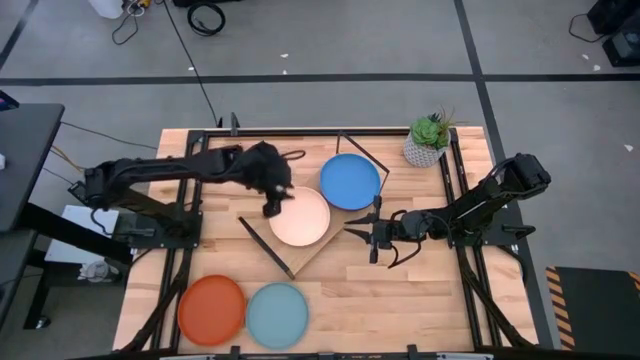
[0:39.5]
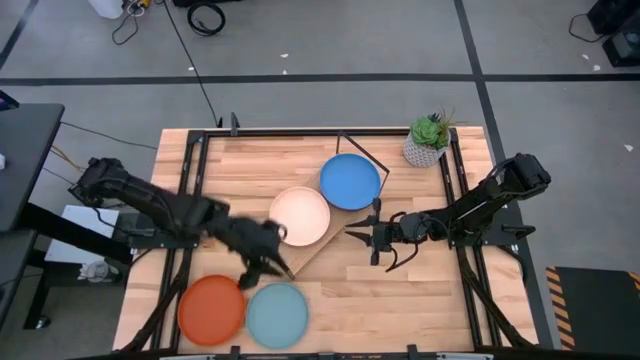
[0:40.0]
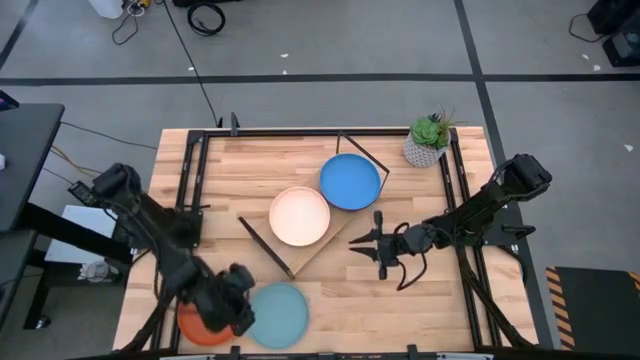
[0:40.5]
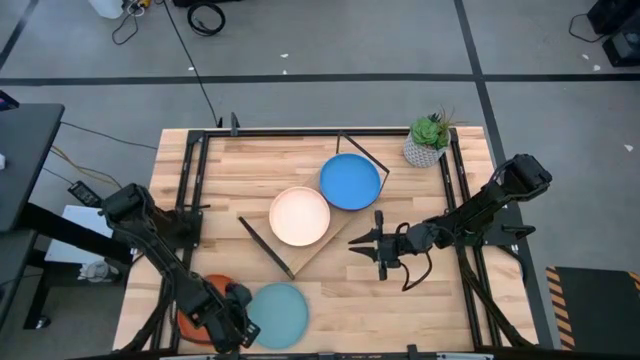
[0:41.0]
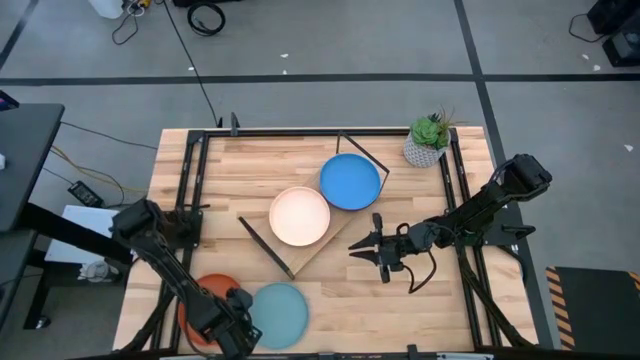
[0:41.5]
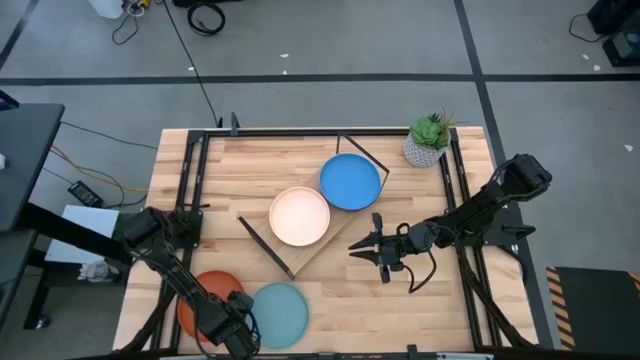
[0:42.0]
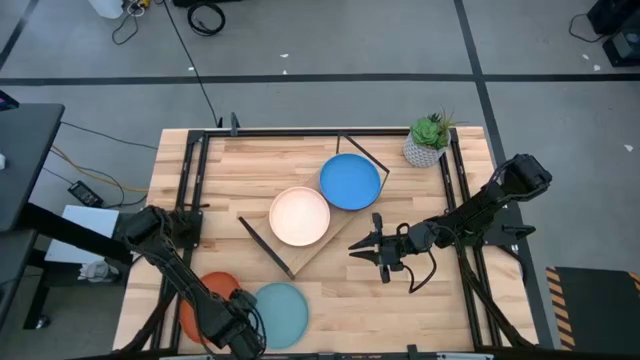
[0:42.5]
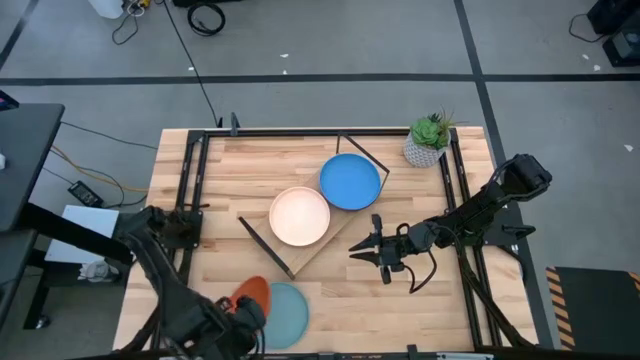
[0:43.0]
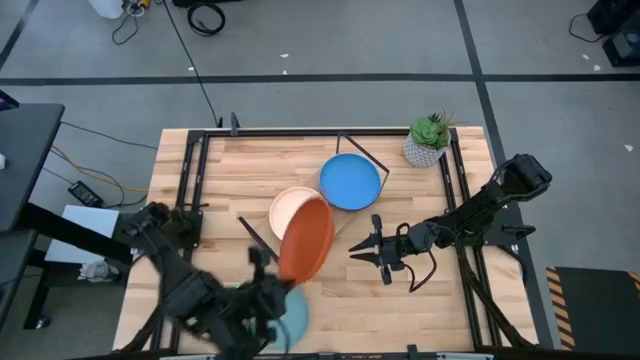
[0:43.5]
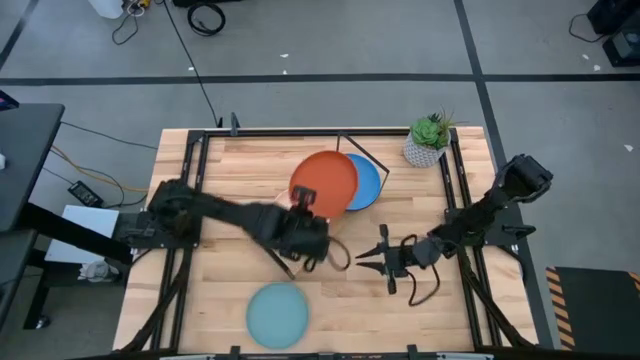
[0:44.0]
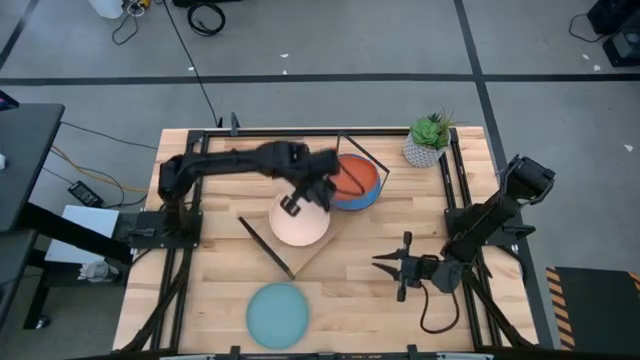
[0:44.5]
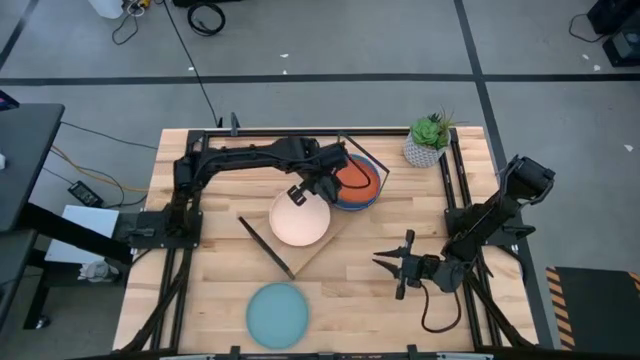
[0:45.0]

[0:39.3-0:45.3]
Task: Place and stack plates onto a shelf
Stack the orange plate on top of the blue plate

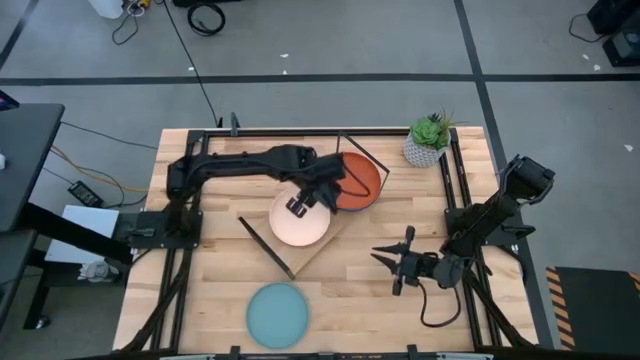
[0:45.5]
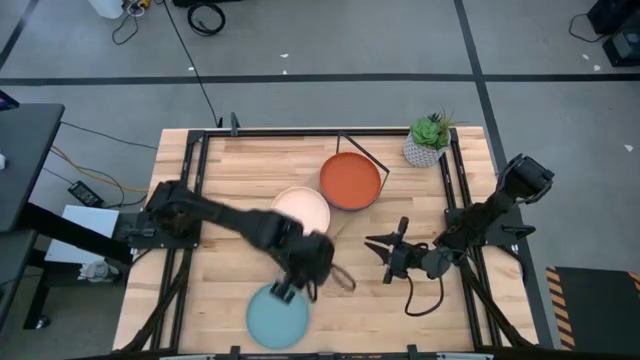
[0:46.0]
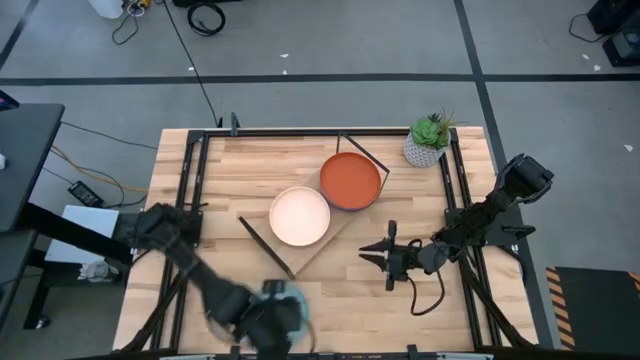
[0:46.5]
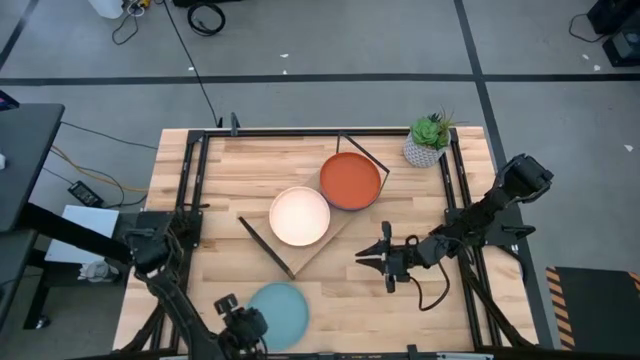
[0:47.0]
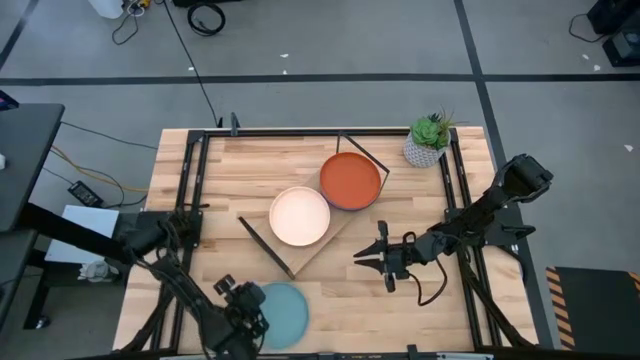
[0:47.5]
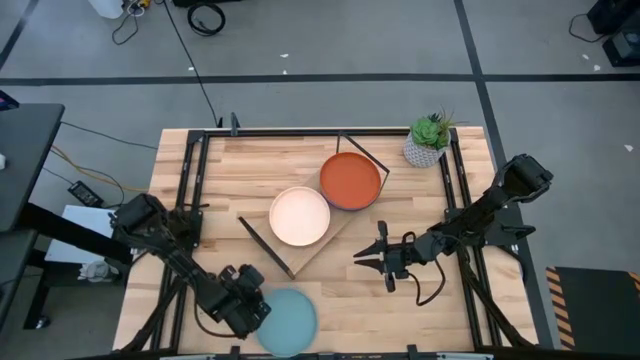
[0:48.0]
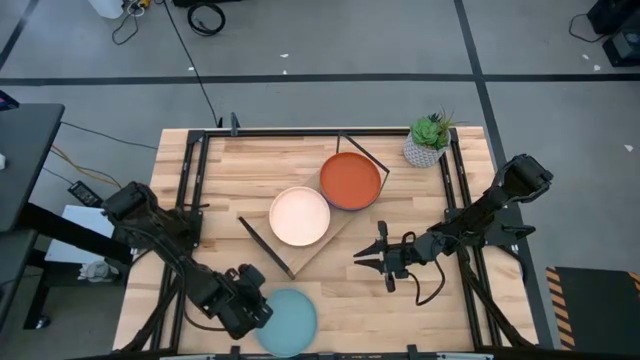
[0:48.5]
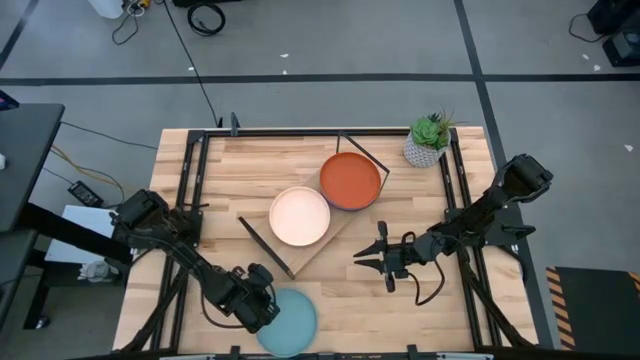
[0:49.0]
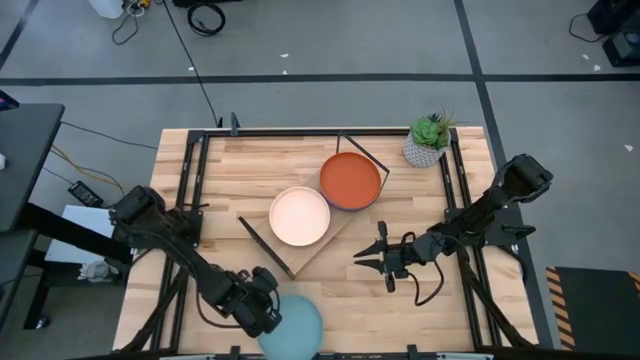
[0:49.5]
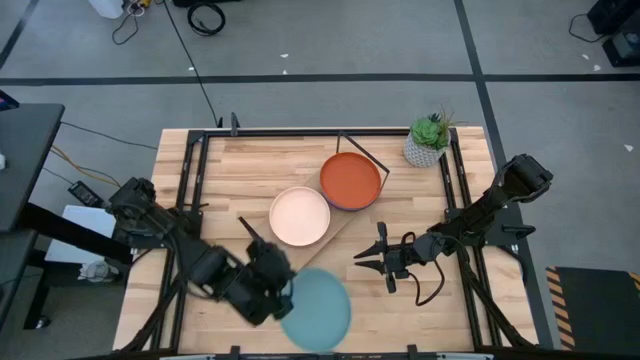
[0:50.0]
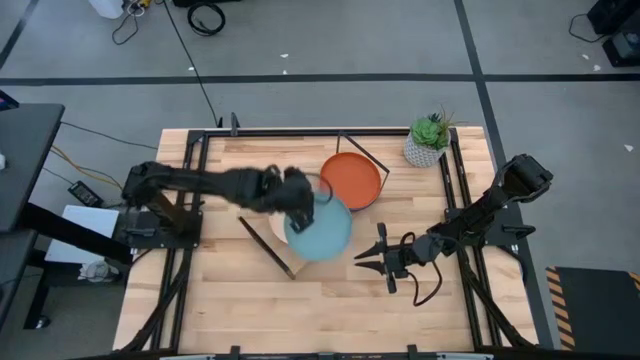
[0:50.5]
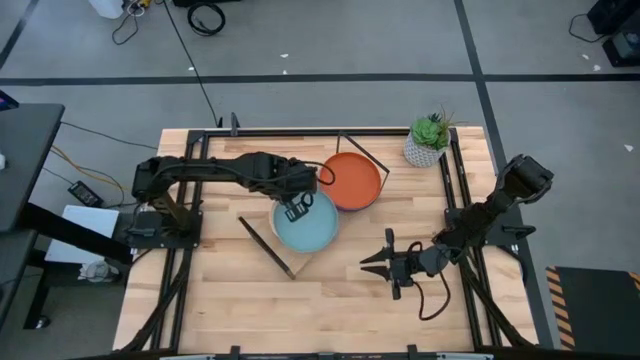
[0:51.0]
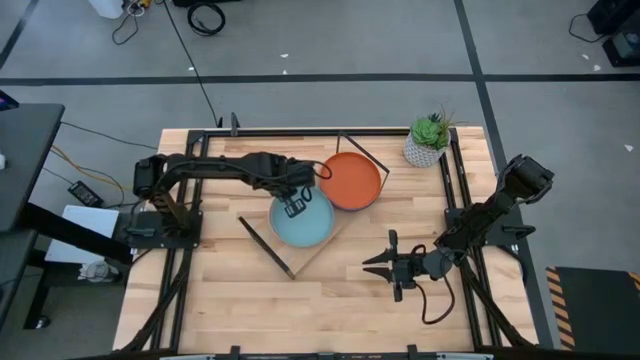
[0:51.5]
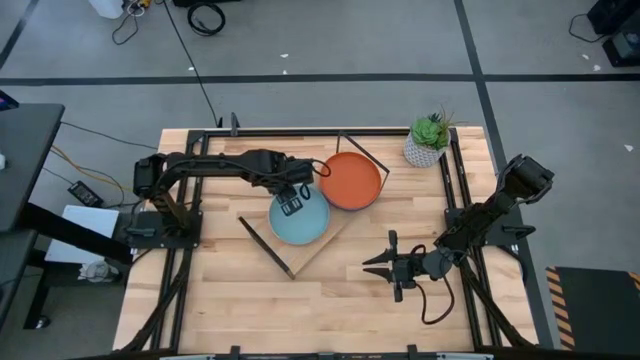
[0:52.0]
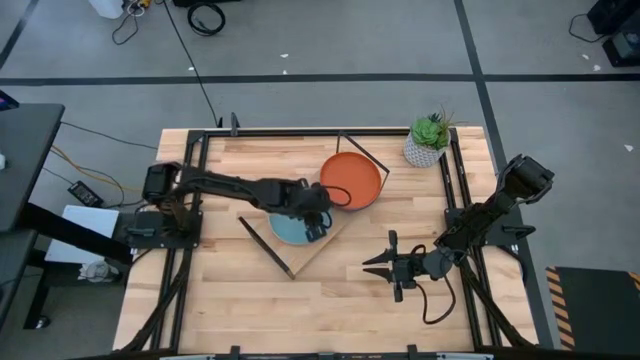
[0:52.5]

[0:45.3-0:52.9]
Stack the light blue plate on top of the light orange plate

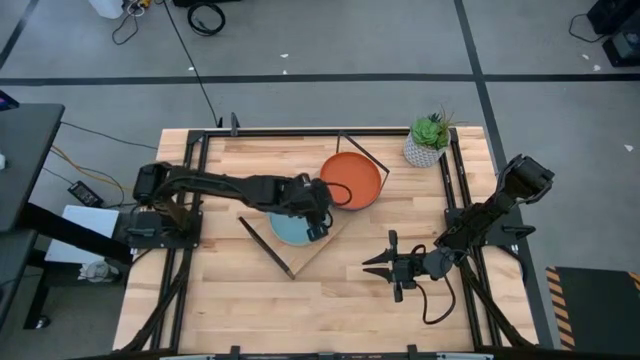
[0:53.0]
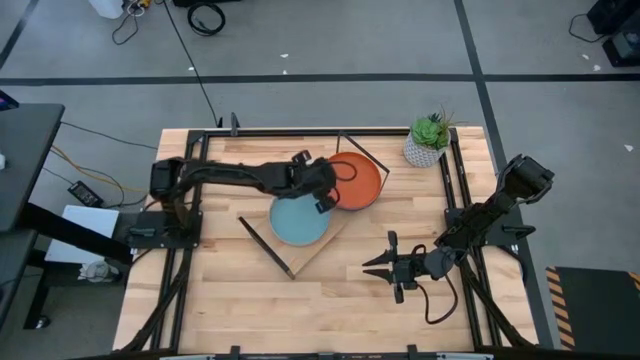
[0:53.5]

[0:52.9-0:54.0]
Adjust the orange plate on the shelf

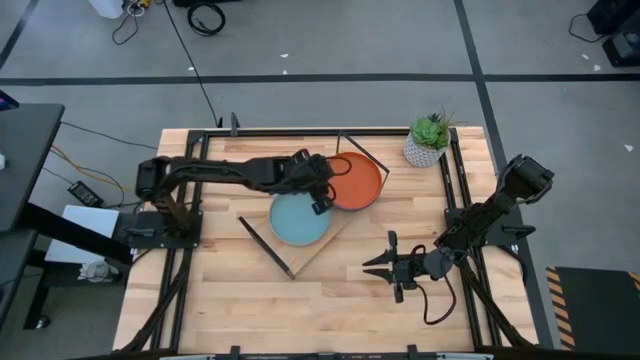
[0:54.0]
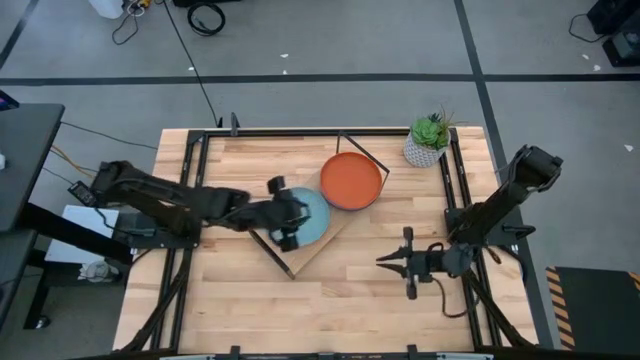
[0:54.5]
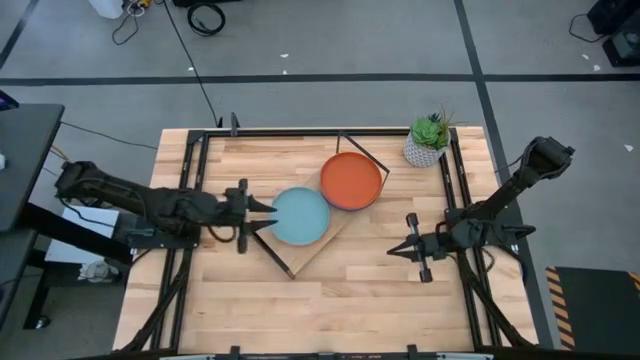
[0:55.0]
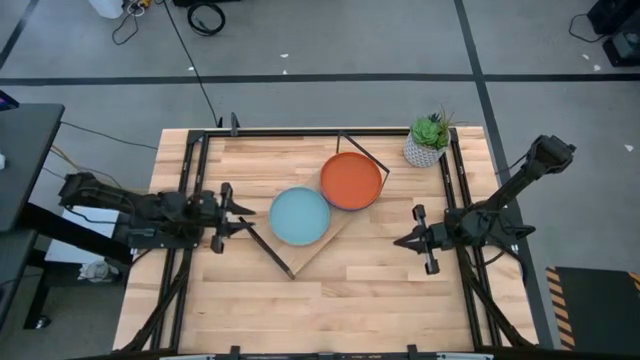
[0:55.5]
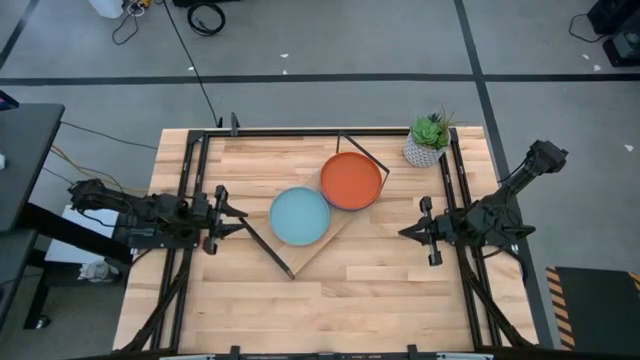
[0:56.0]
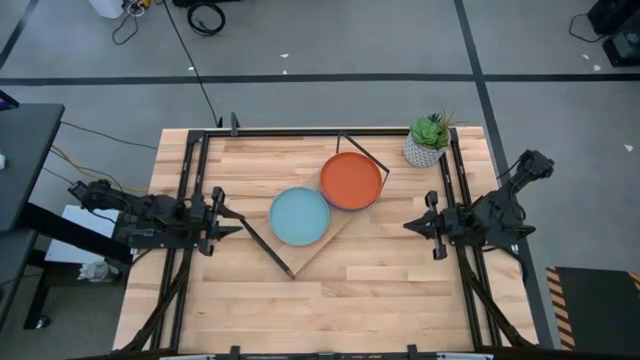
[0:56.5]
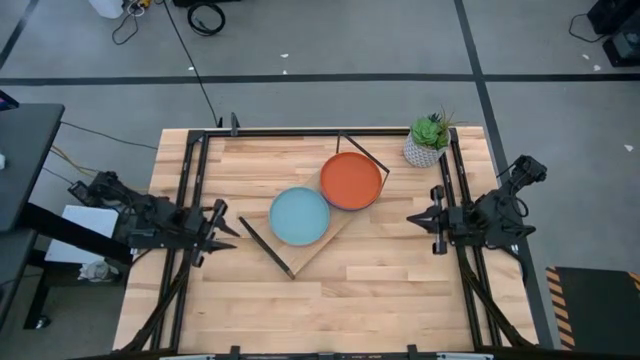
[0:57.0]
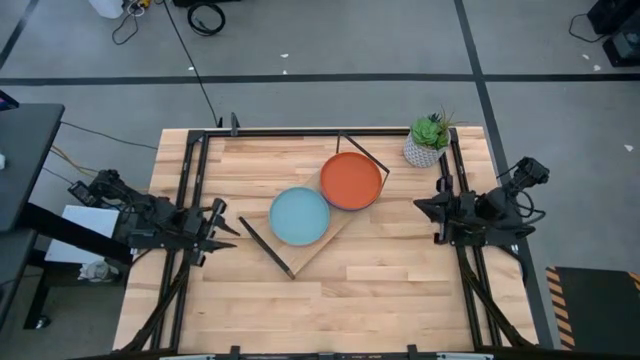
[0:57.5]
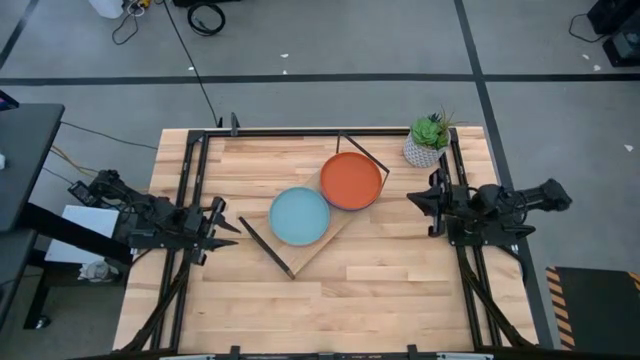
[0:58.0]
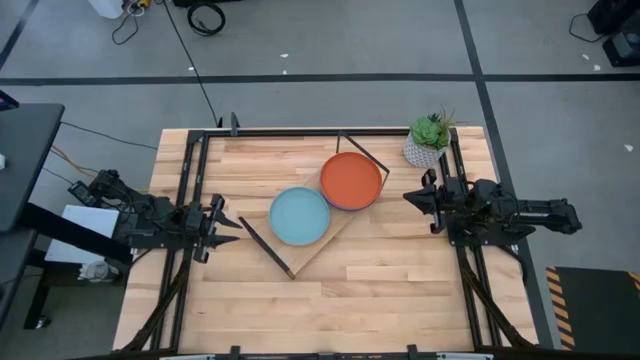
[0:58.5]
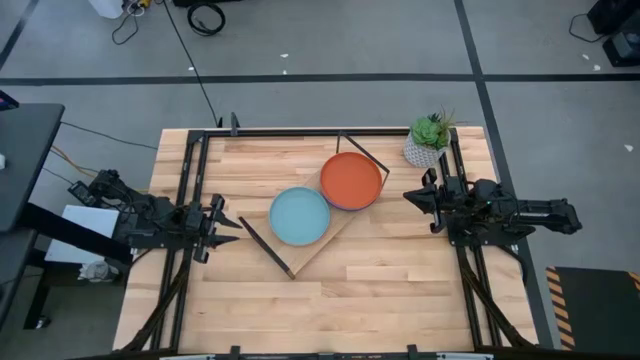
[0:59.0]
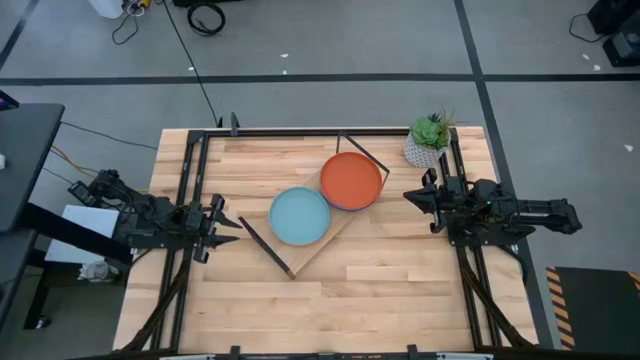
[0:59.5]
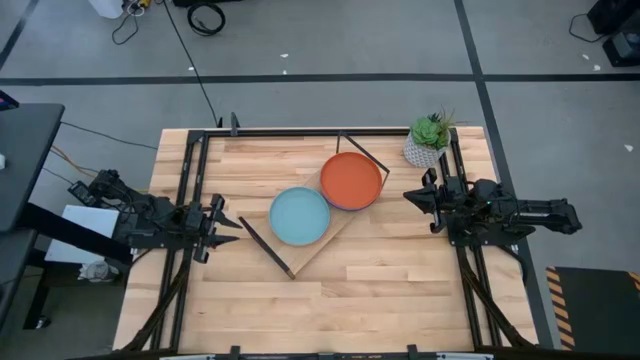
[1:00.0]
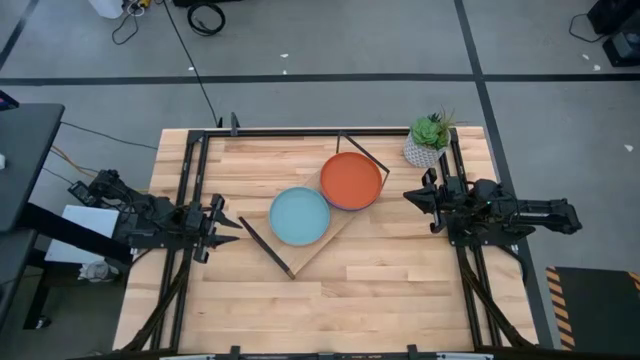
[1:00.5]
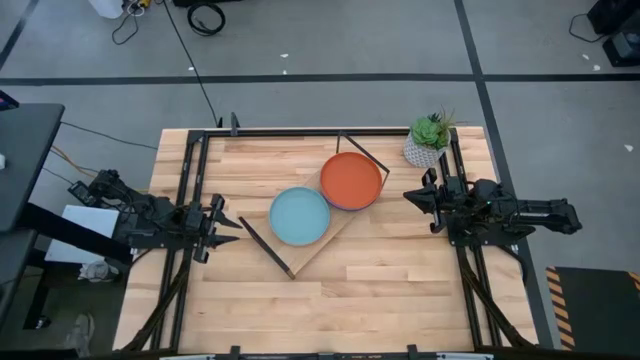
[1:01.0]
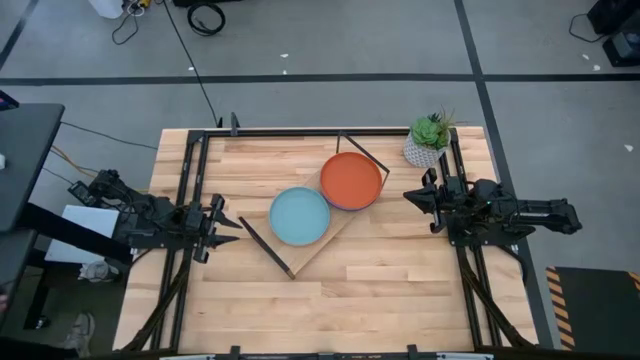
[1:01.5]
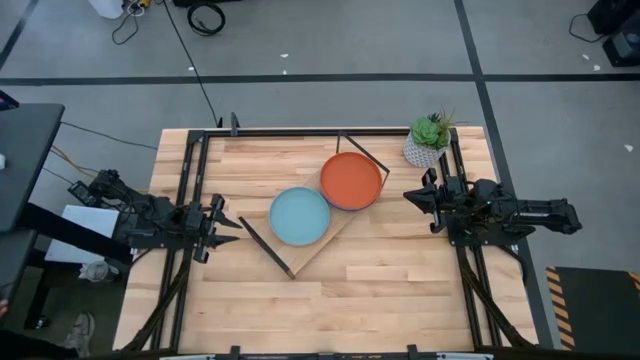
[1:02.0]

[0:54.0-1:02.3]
Return to Home Position
